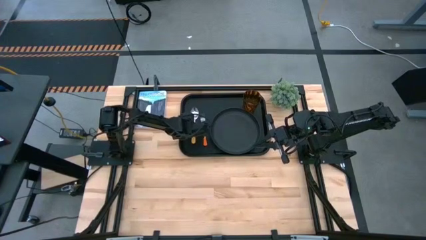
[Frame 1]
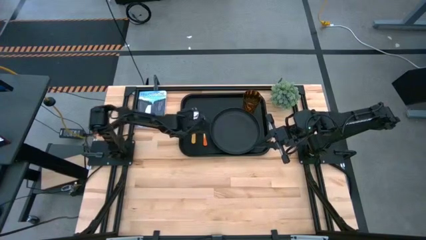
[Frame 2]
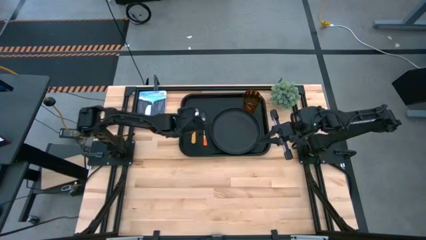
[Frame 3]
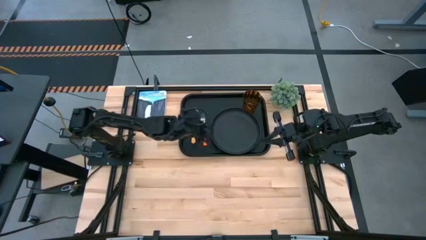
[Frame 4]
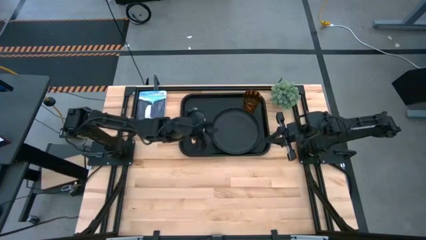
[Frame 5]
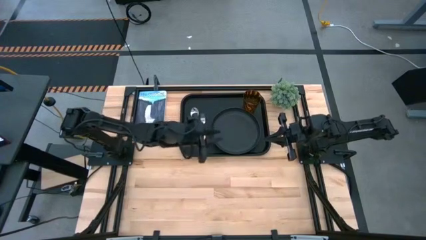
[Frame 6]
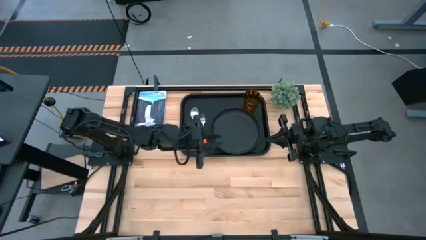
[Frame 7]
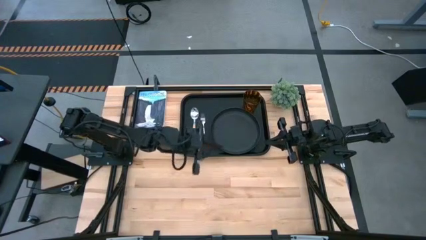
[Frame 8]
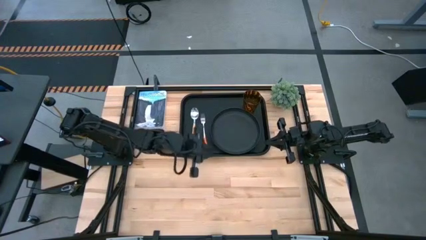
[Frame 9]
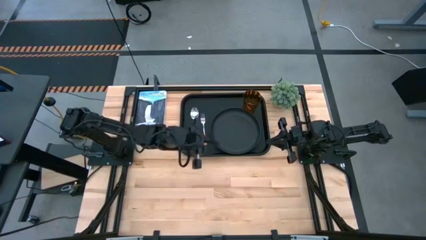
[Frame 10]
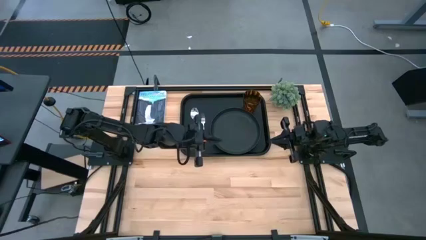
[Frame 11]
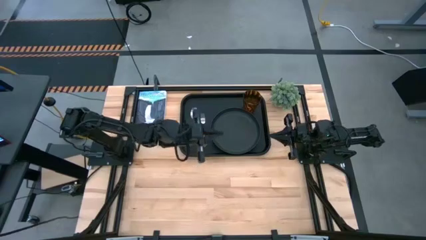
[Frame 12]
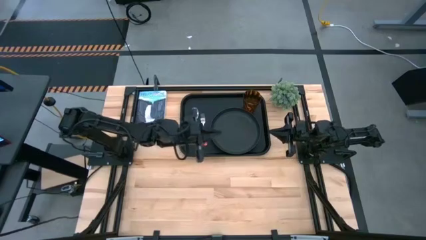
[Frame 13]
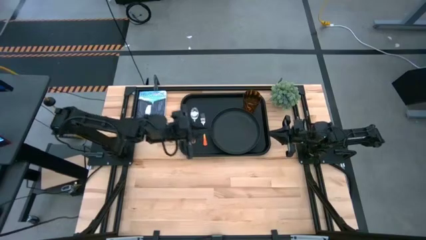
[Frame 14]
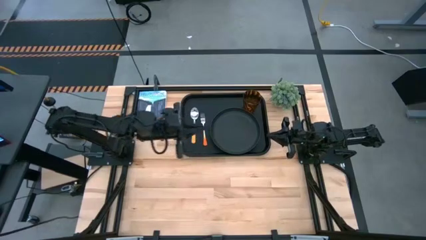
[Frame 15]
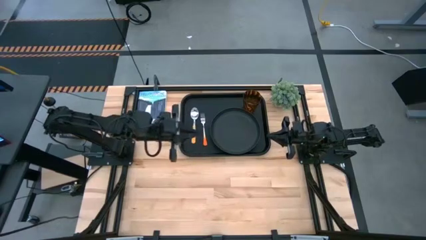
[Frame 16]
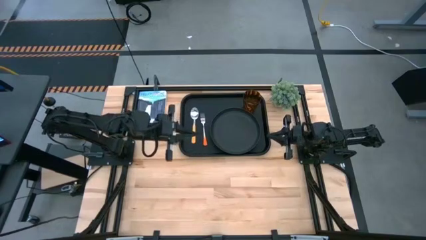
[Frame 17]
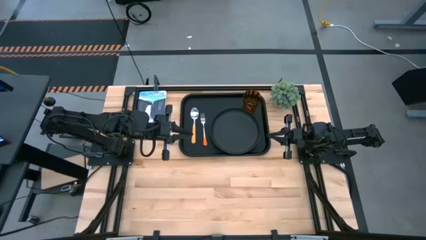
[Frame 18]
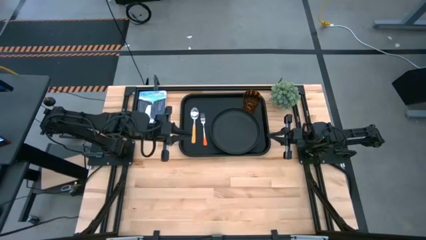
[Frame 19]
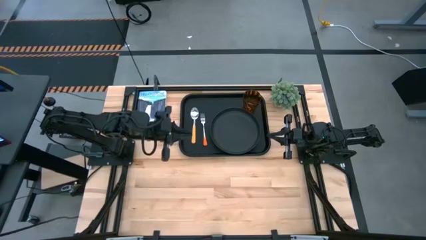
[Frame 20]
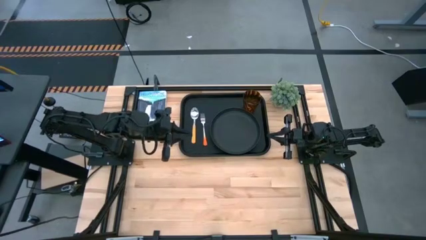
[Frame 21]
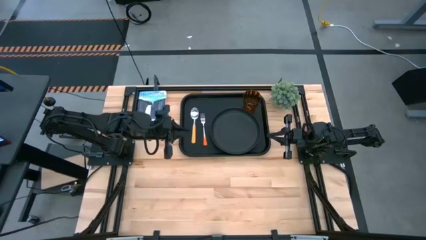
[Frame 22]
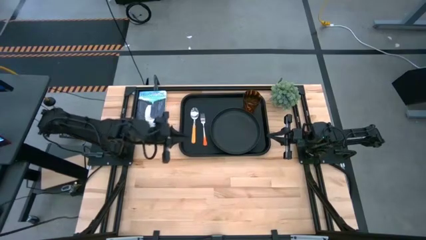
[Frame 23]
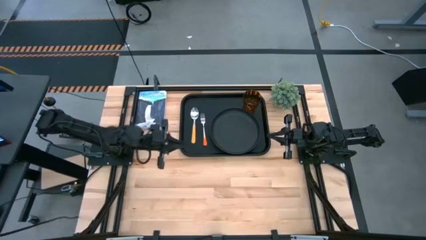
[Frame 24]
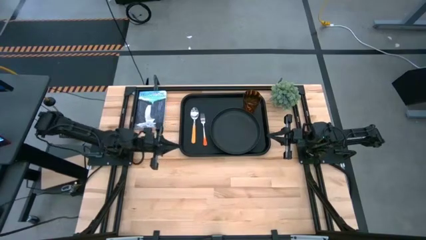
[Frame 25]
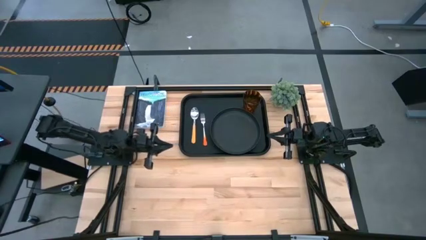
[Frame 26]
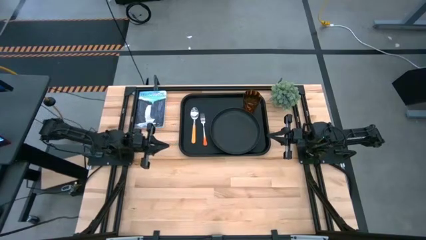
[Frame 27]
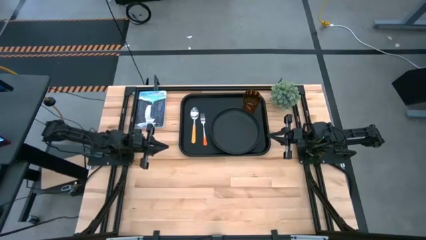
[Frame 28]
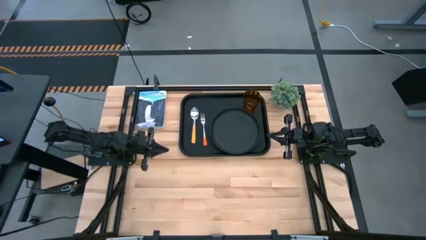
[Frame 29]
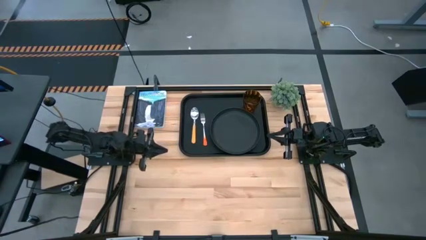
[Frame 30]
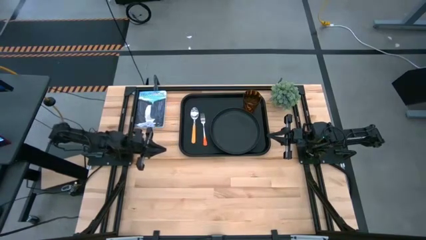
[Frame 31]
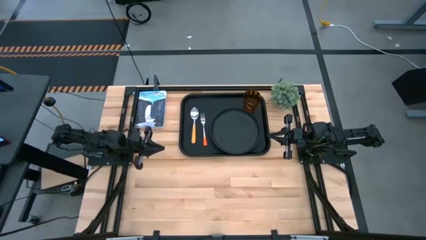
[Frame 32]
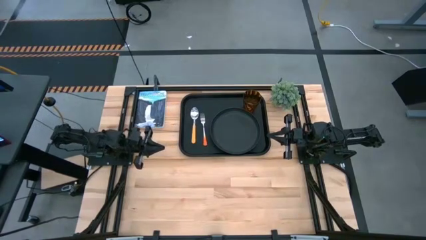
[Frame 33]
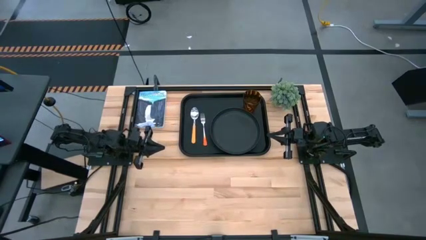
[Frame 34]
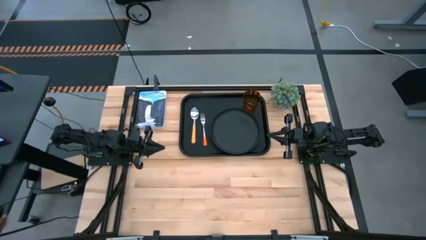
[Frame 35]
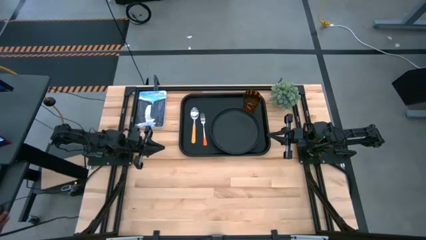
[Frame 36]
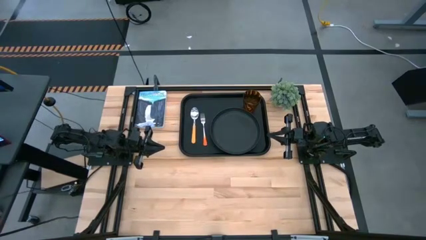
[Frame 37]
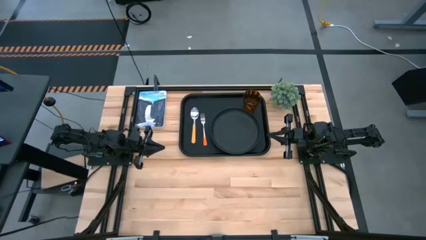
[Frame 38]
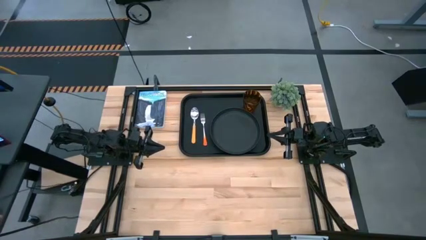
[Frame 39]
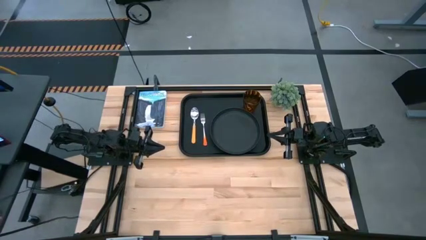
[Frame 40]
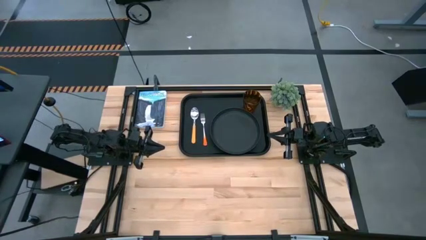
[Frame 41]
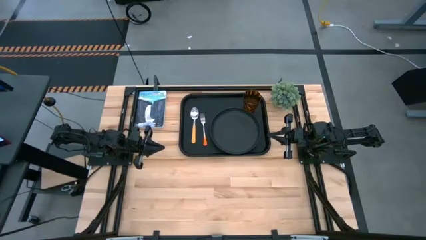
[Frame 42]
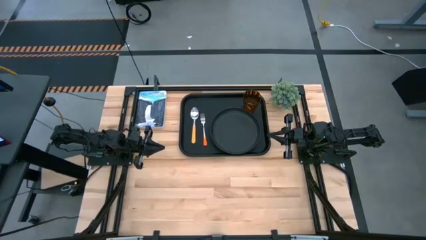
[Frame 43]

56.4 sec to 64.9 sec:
Task: Pick and place plate/cup/fork/spoon on tray
Return to Home Position

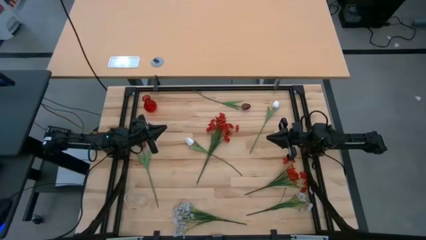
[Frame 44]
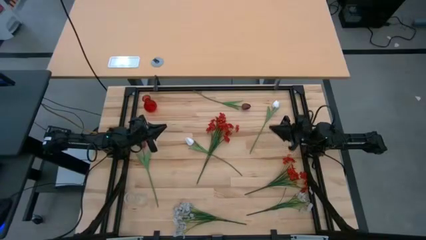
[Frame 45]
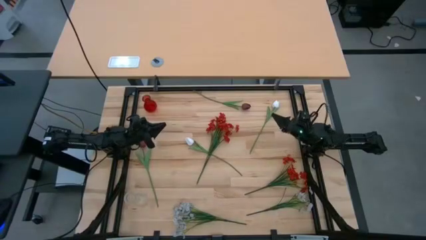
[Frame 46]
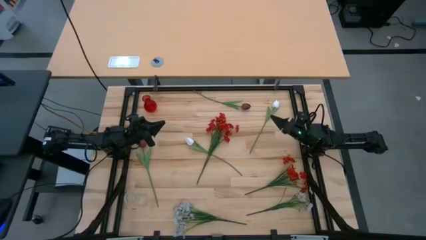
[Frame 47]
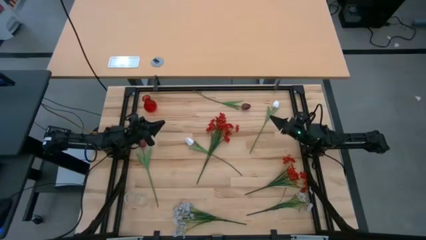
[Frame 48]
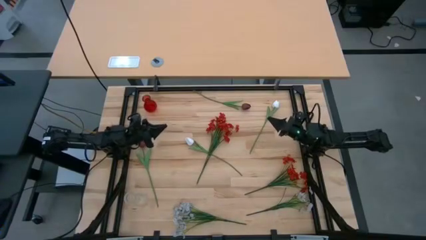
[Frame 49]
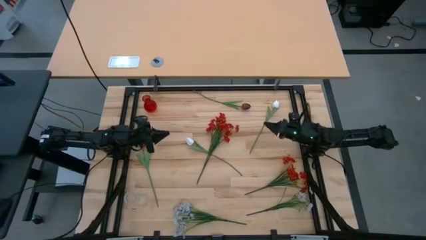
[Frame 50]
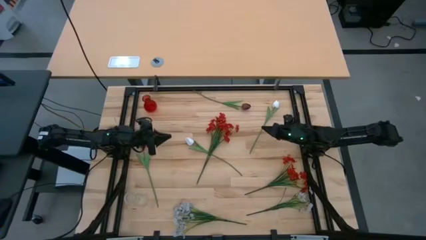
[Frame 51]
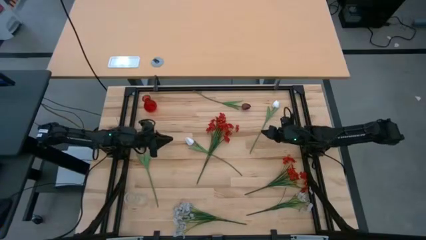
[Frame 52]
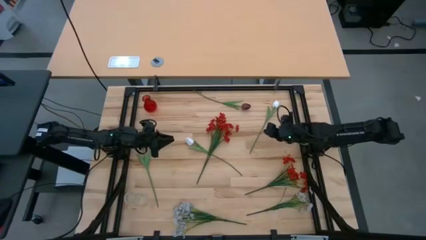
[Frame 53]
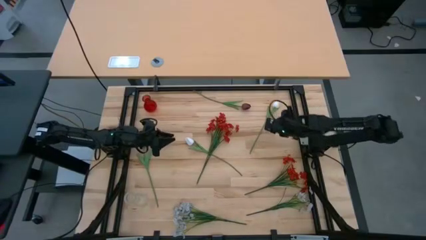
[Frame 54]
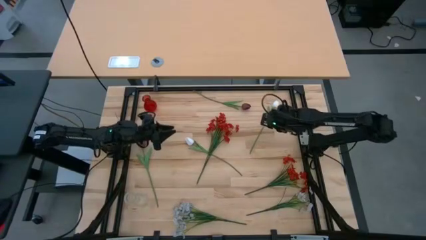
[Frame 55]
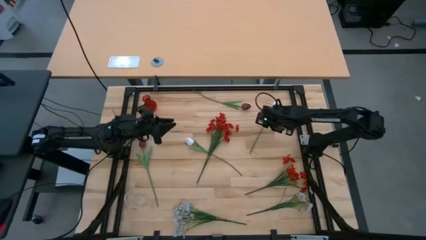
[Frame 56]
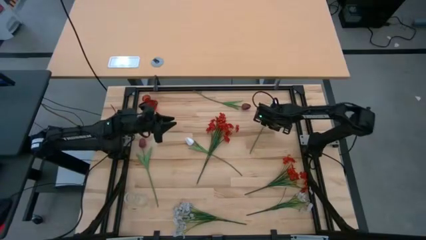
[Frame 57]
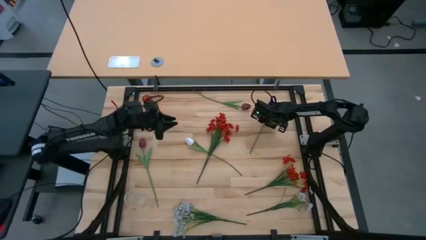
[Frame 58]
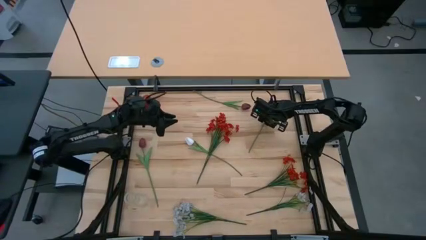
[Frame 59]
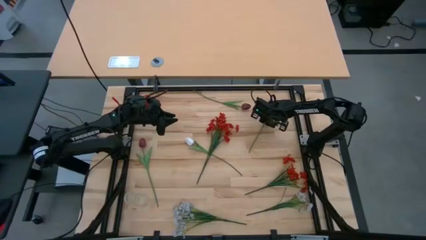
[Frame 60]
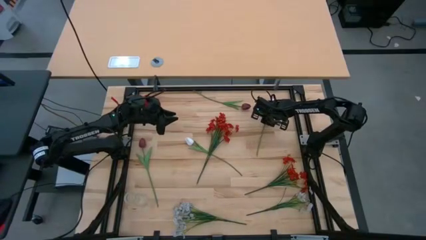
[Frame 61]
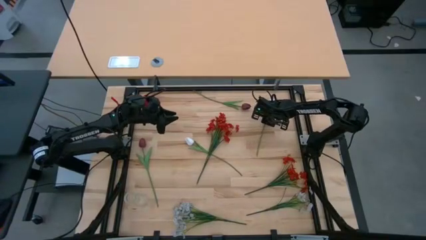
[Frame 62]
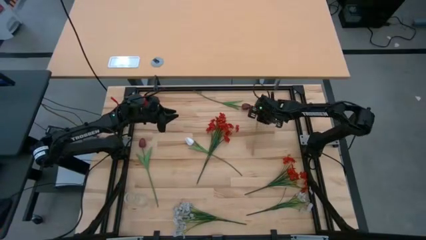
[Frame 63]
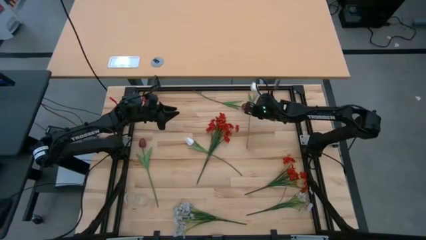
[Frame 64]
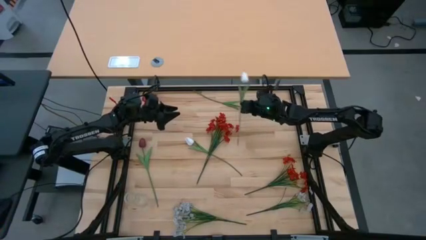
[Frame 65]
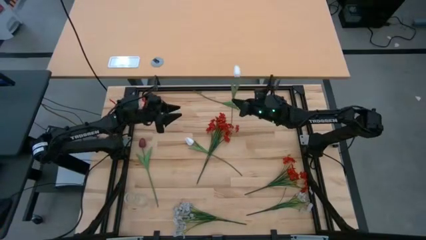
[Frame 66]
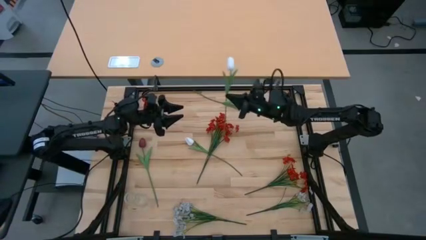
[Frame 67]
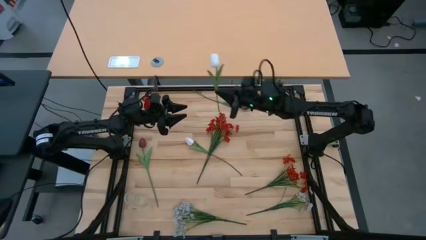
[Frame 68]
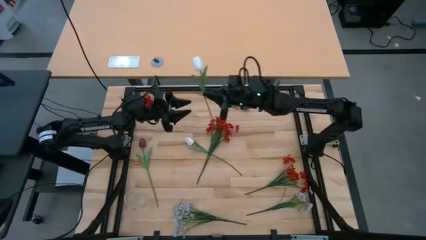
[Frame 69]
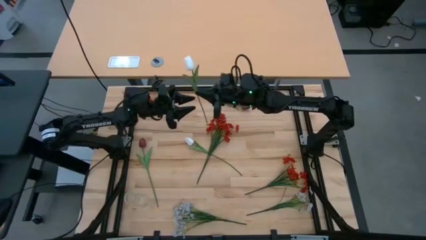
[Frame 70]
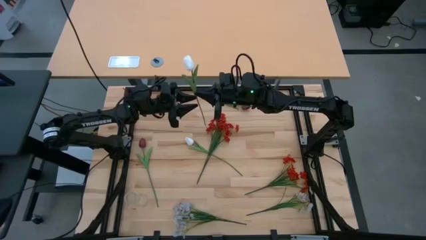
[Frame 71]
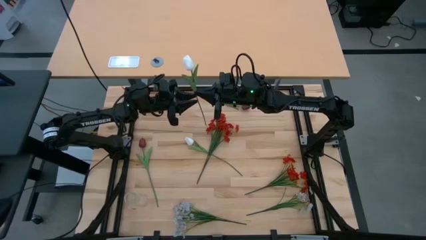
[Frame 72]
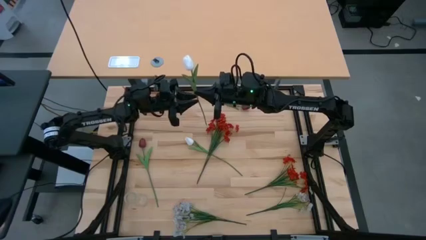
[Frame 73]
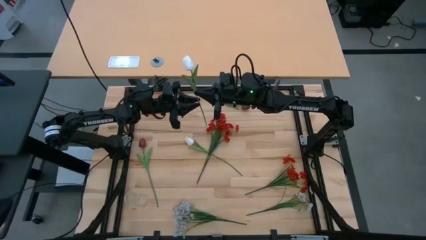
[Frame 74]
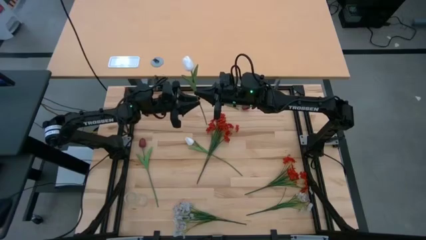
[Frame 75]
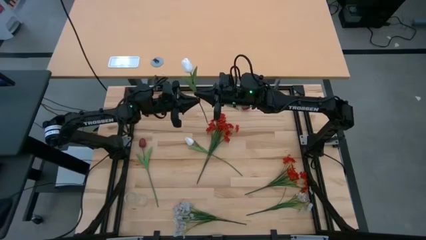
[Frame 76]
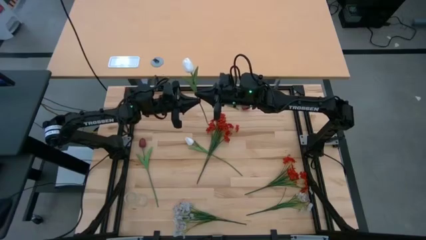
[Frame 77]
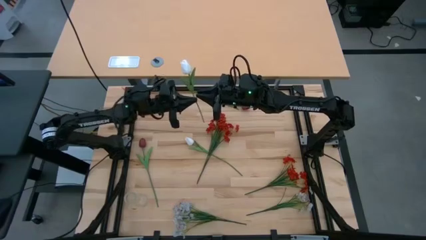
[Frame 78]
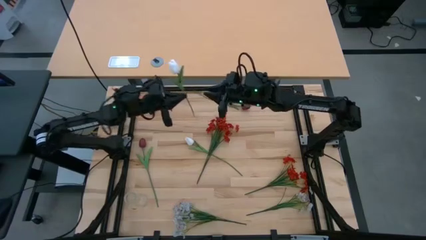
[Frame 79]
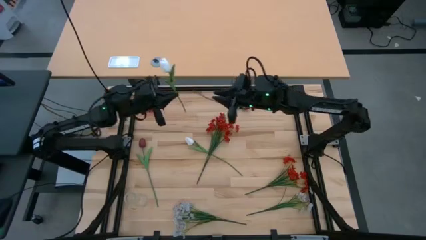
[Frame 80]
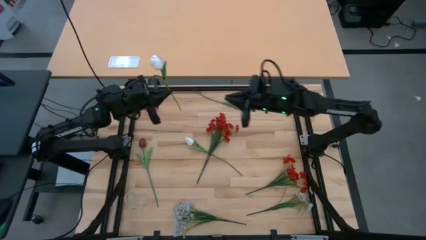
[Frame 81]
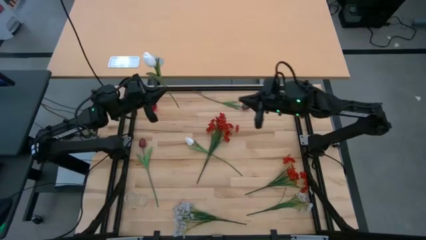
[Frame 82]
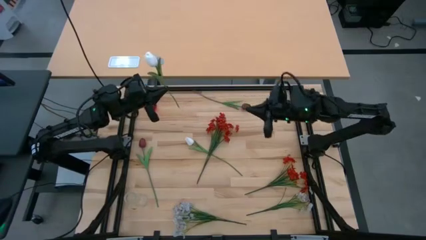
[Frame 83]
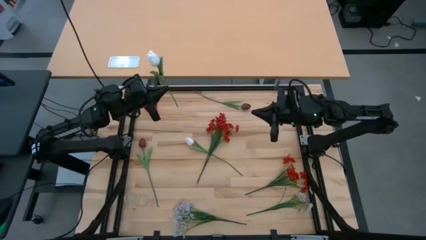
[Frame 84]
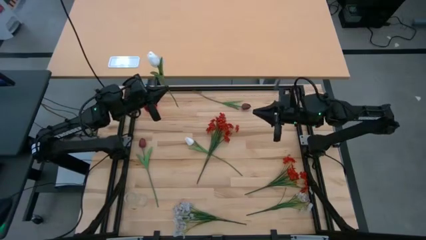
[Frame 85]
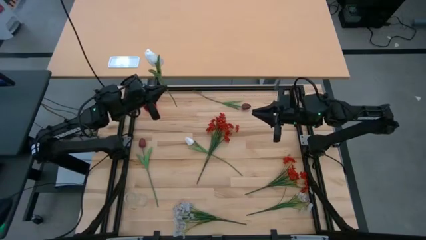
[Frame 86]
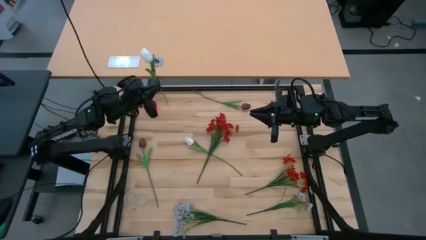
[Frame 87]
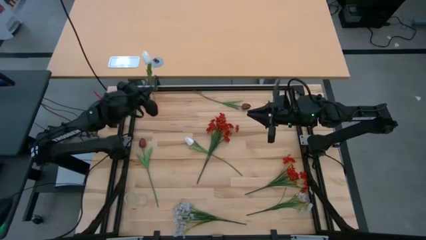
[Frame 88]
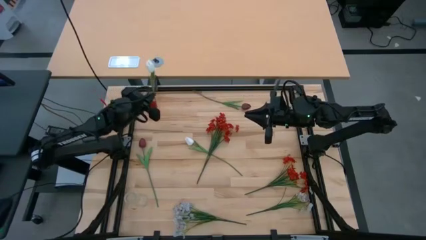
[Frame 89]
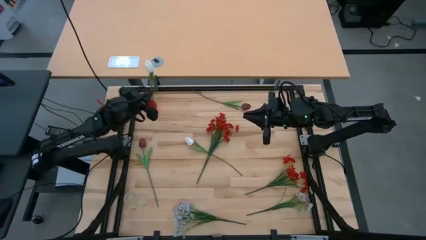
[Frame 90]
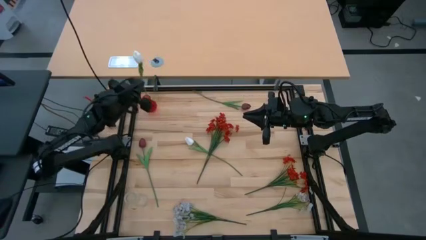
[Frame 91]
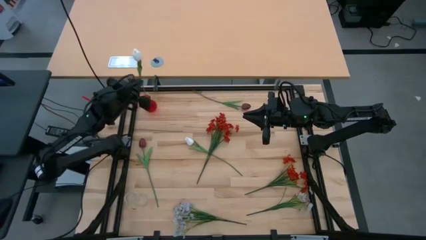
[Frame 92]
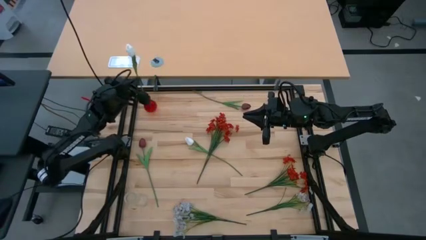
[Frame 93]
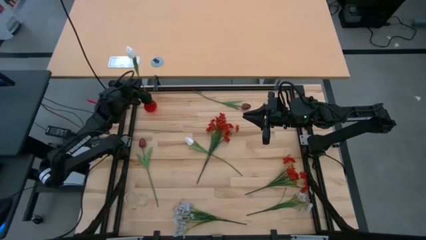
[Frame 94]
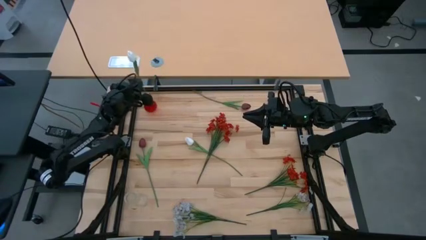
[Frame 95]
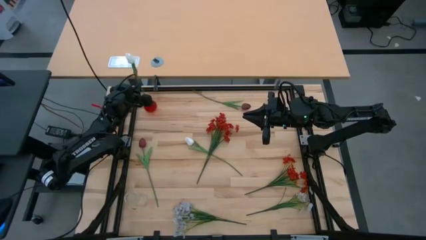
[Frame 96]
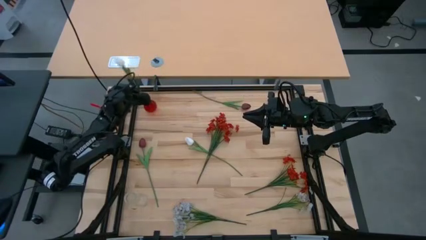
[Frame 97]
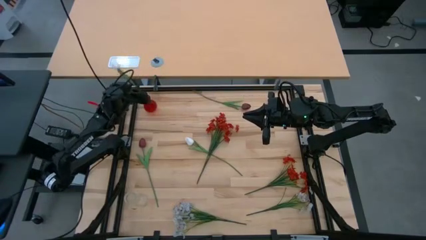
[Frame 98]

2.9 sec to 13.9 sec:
Task: Sort flowers into vase by color
Put the top white tulip into the red vase
